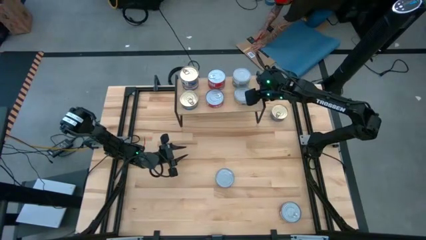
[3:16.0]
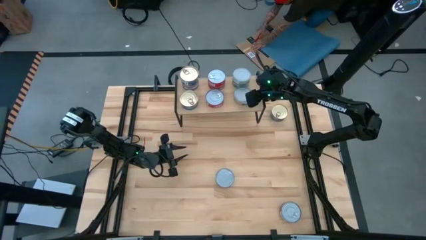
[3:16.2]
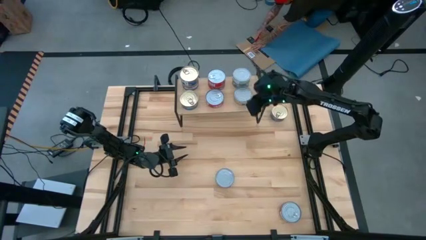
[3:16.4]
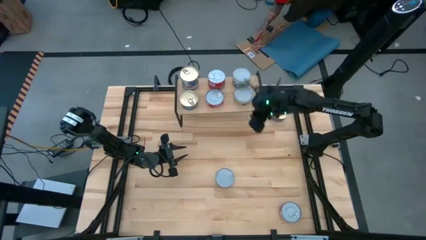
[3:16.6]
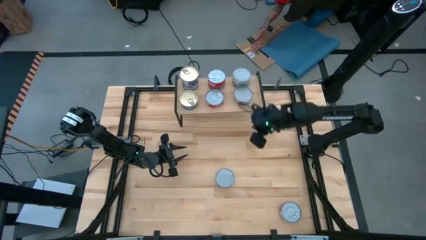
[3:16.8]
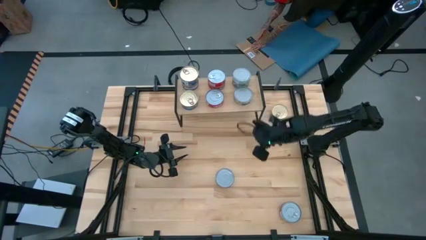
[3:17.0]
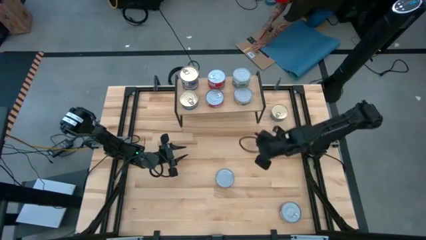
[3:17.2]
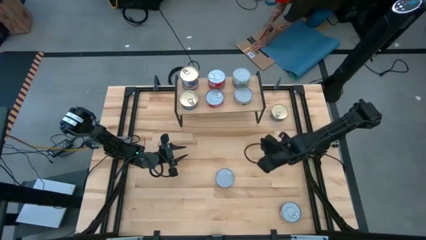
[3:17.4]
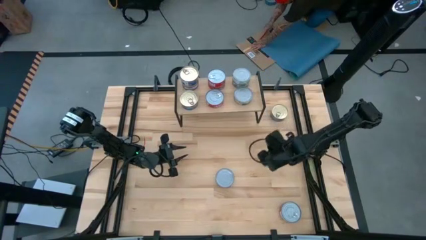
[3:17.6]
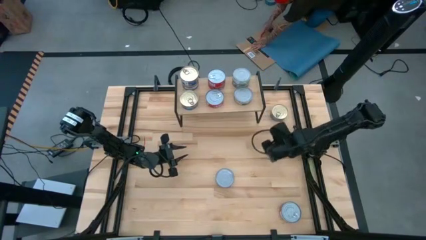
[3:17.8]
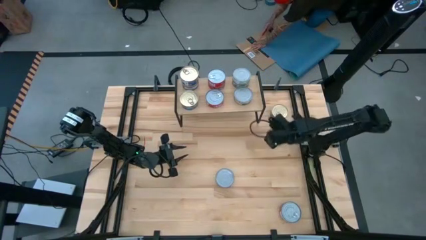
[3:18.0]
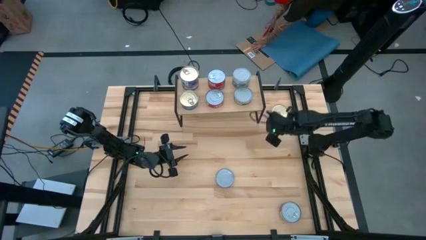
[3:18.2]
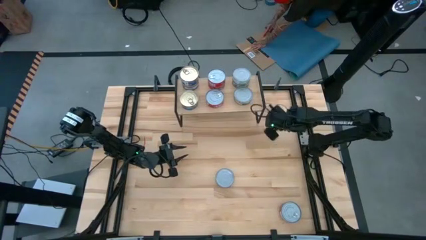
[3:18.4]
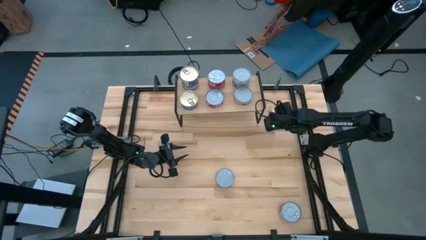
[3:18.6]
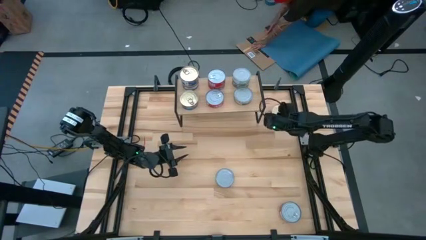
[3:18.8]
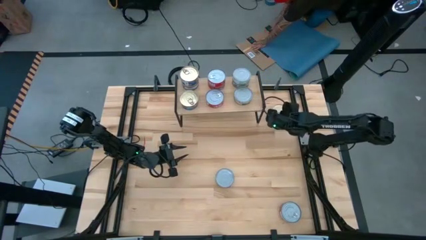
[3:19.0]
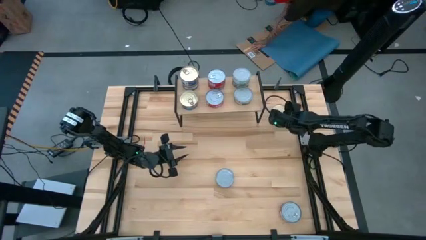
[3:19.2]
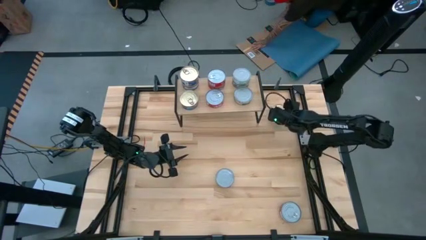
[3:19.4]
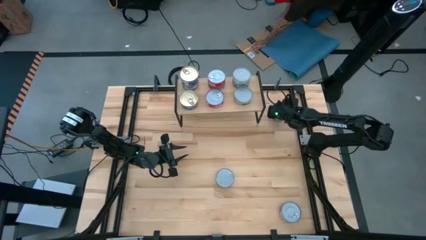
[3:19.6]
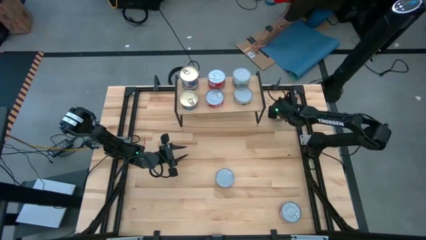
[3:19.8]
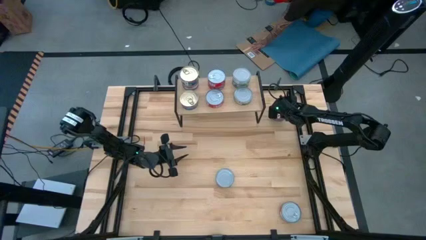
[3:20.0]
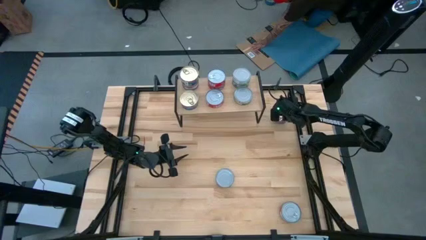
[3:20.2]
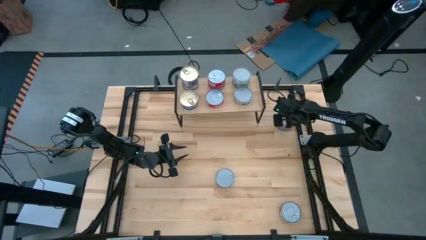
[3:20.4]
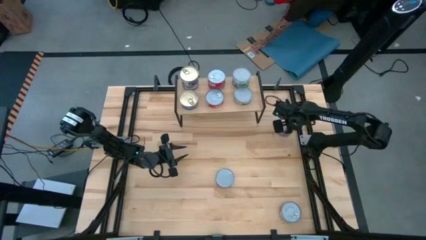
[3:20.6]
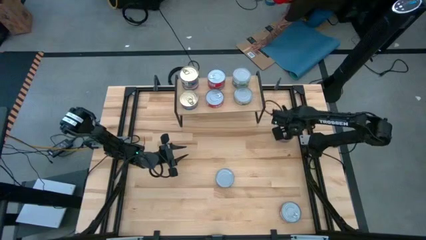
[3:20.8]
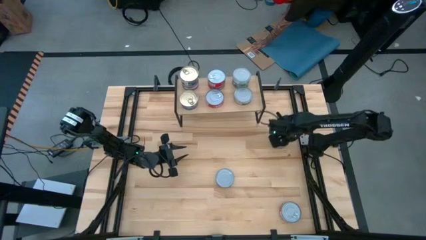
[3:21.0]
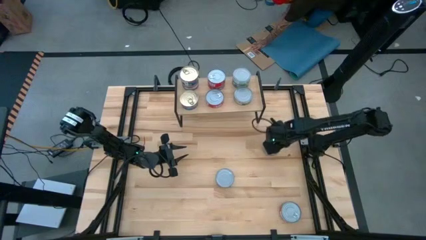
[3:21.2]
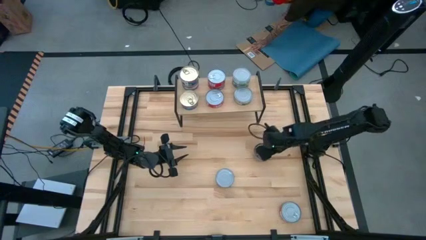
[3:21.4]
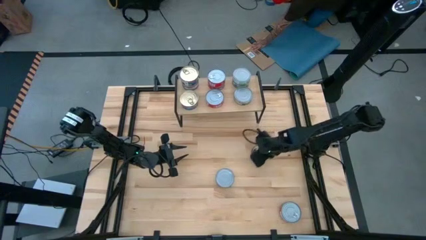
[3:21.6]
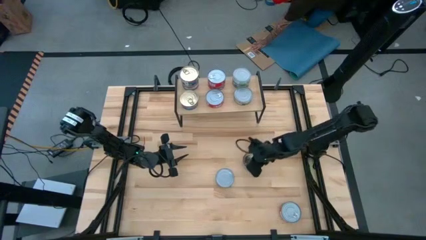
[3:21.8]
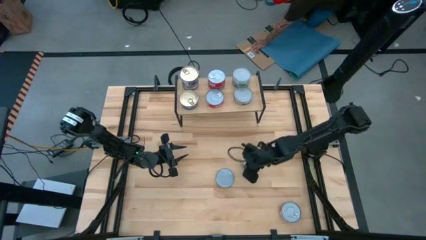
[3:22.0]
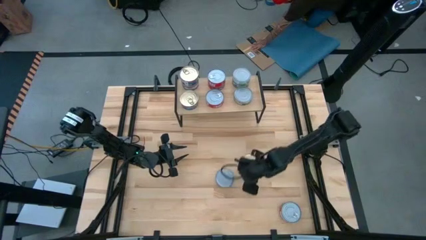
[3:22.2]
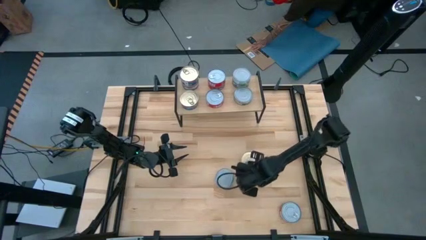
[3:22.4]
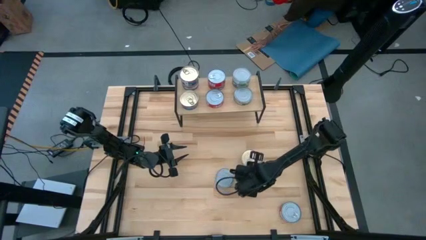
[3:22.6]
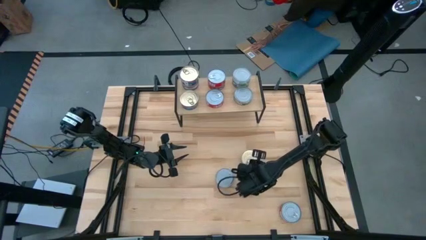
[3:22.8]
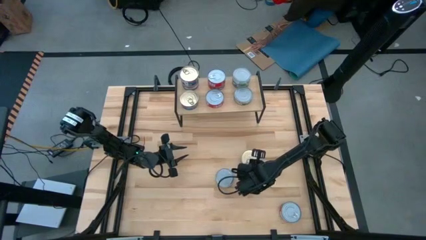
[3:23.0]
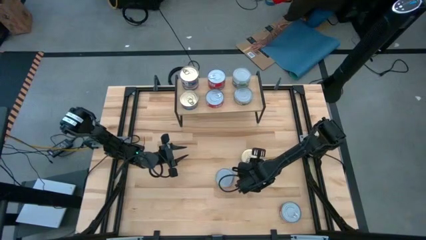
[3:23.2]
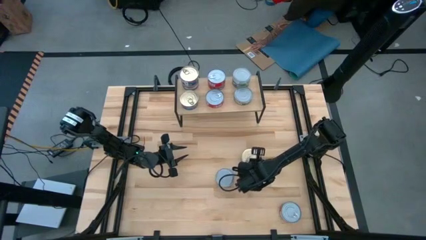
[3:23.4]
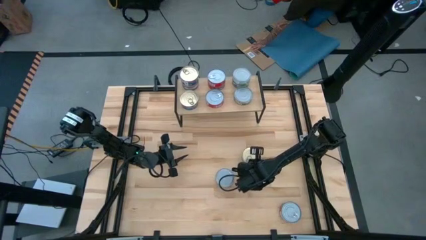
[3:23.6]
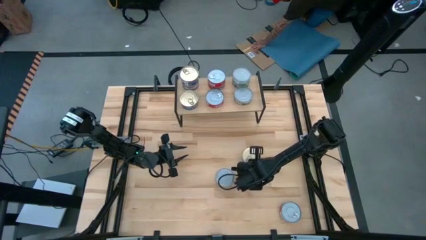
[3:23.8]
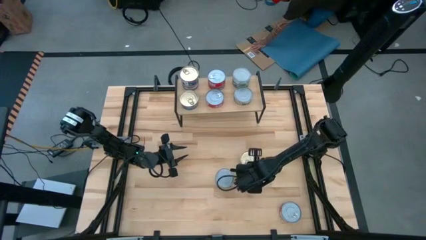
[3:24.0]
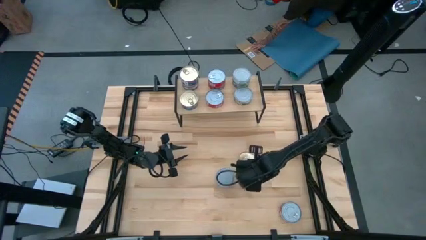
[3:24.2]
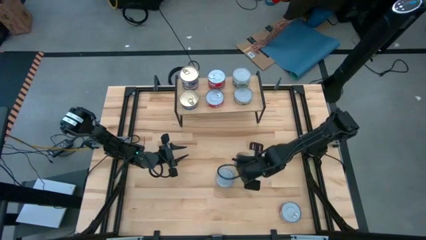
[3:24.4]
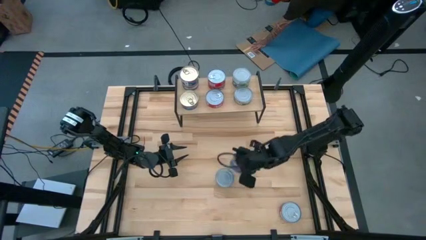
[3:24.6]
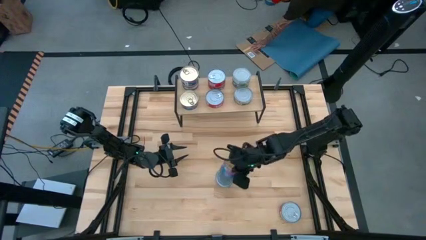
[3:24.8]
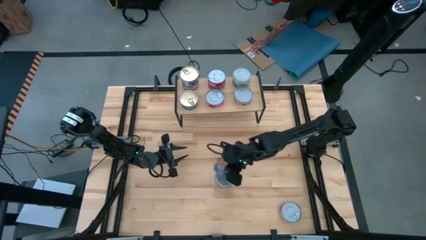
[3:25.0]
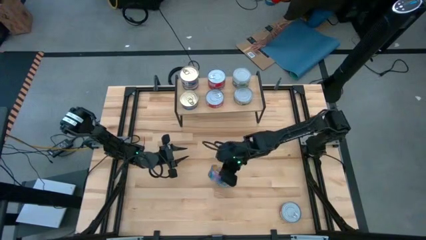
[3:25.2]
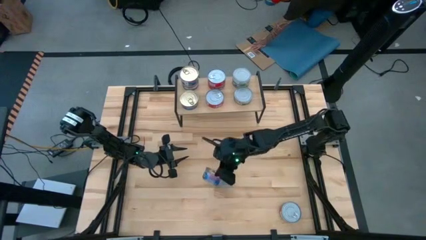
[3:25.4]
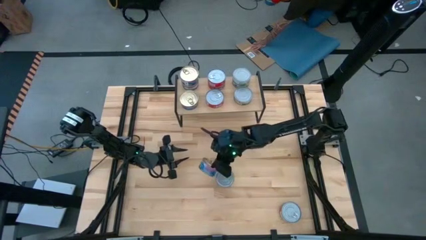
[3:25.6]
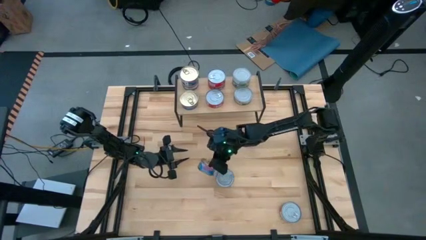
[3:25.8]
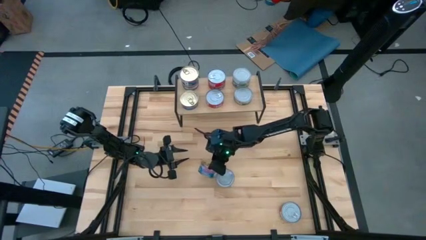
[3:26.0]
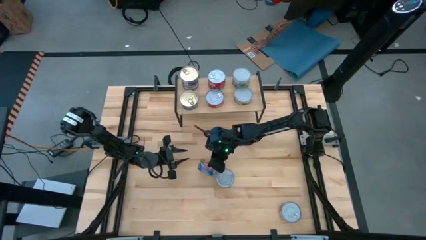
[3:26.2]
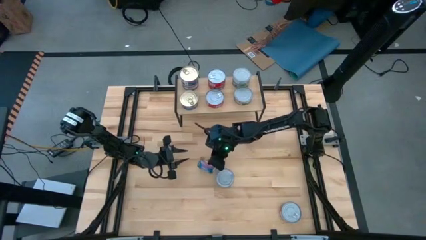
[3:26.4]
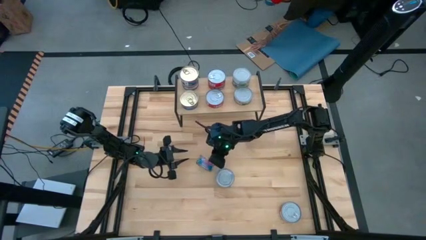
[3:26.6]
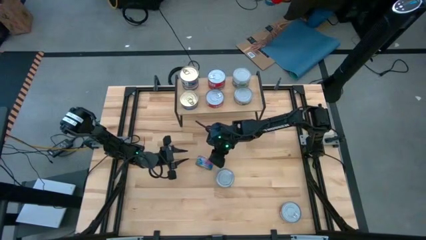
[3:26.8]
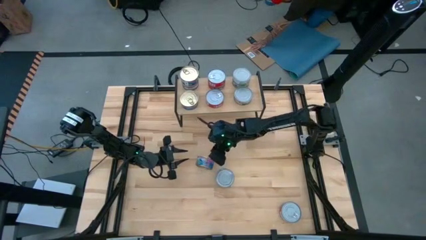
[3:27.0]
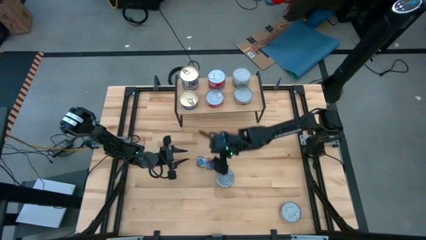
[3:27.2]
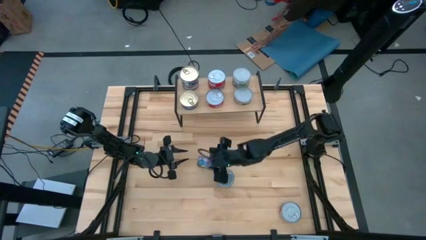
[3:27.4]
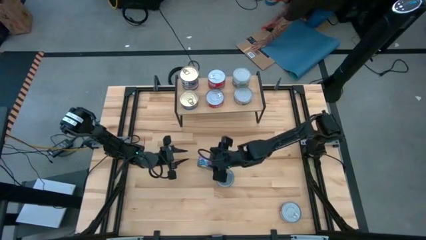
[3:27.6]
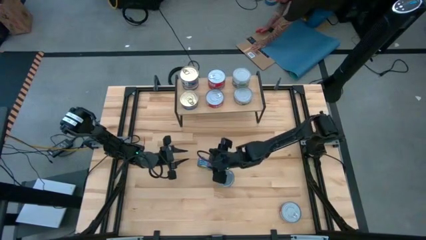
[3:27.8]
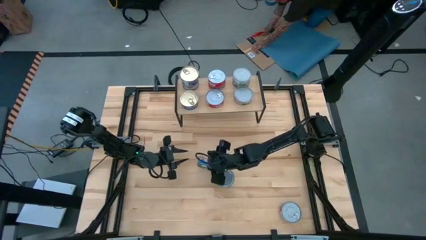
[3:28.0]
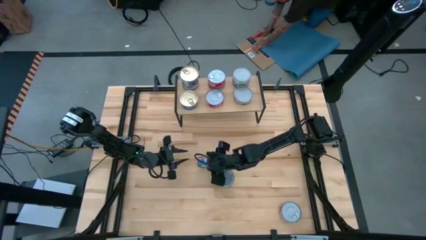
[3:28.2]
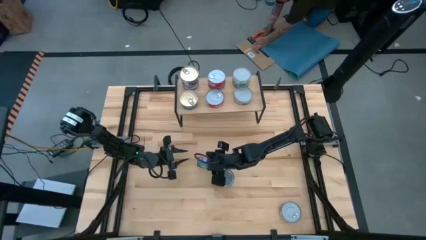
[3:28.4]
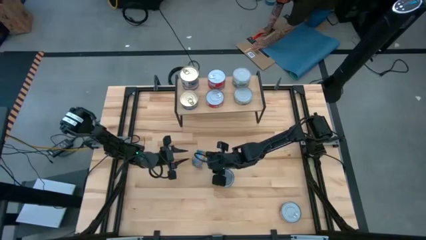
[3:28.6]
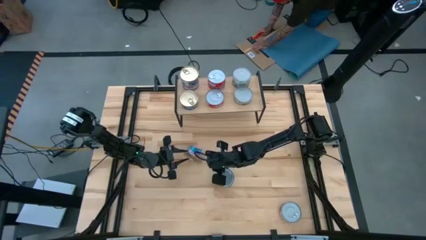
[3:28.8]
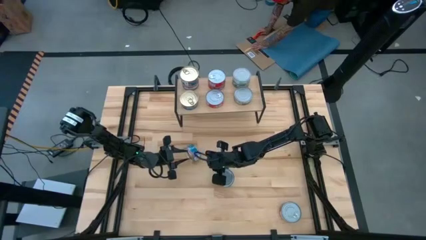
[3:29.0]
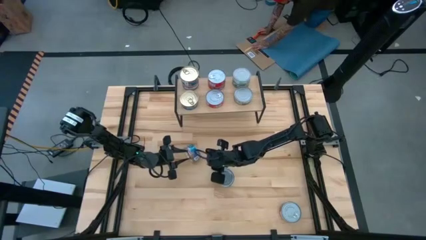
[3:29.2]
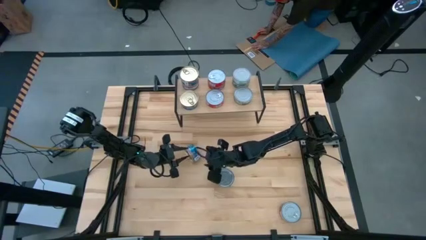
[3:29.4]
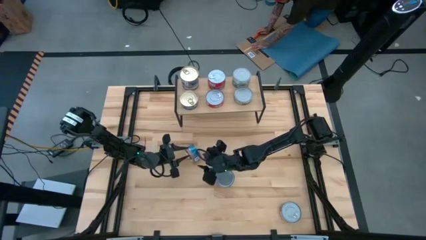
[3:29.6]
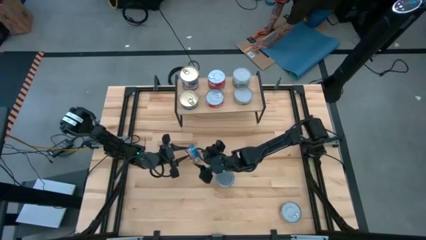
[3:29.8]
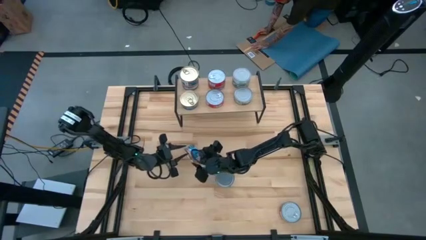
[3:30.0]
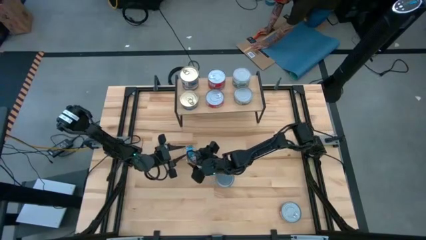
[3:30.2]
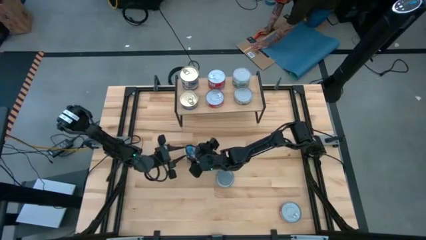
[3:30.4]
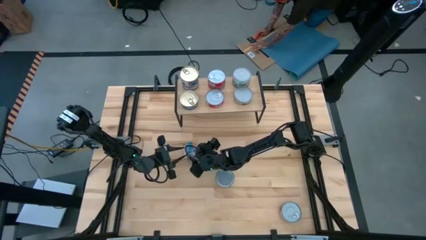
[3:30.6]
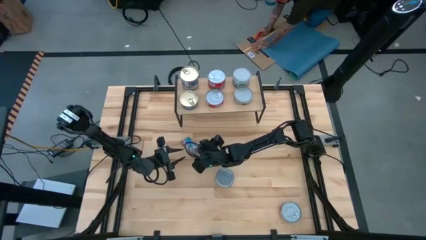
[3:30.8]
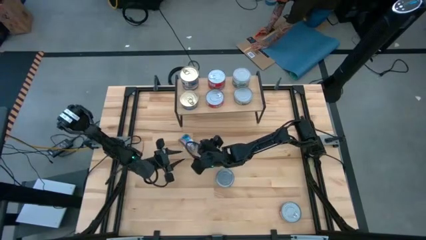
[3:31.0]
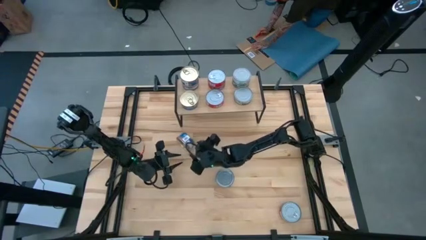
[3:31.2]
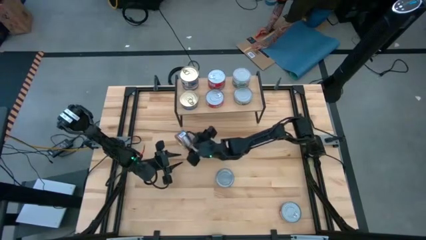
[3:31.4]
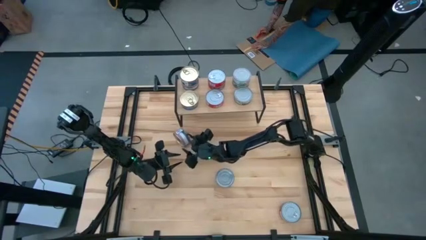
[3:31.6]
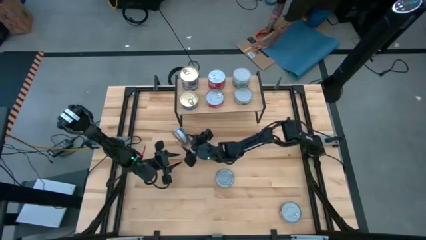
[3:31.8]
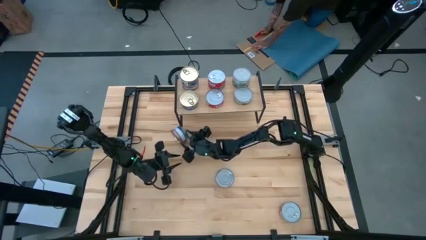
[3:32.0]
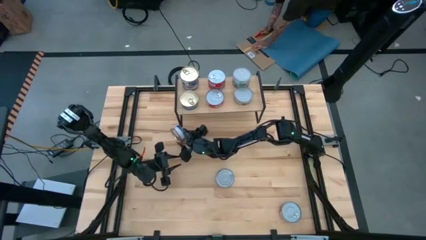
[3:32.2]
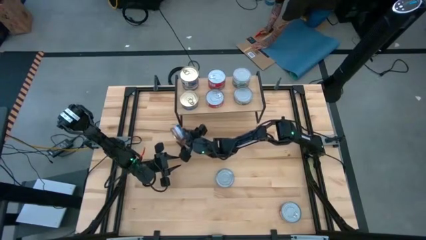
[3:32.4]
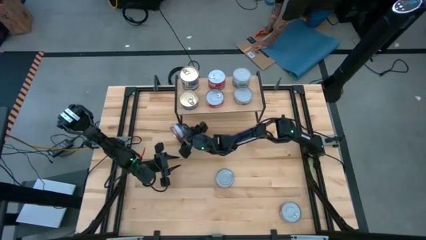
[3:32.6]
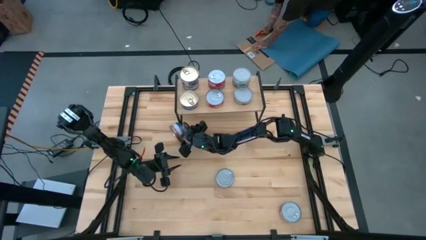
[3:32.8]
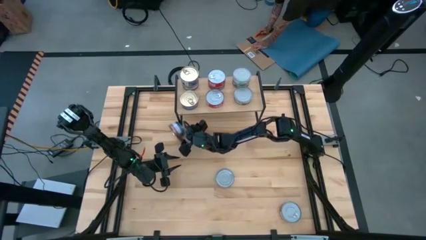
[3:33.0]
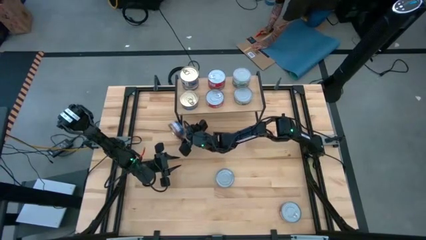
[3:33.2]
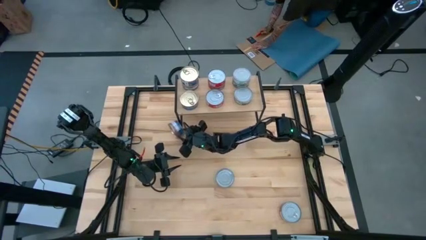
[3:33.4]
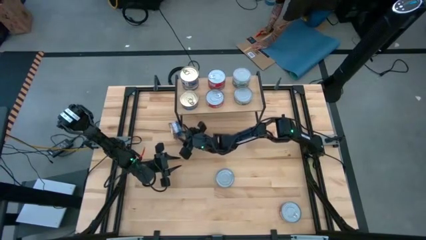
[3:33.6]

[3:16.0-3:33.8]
Task: Stack canned seafood by type on shelf
Stack the blue pink tuna can on top of the other blue pink tuna can on the shelf
